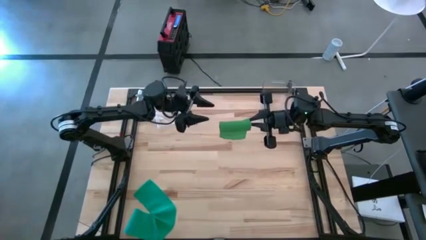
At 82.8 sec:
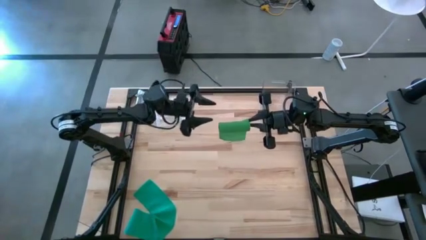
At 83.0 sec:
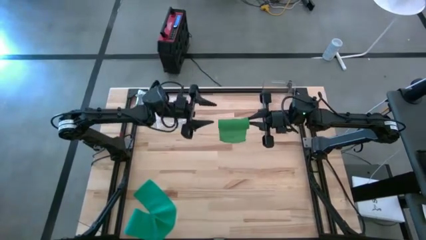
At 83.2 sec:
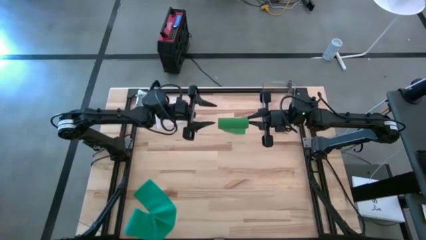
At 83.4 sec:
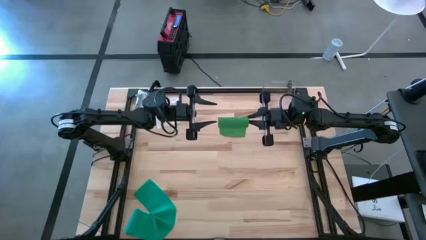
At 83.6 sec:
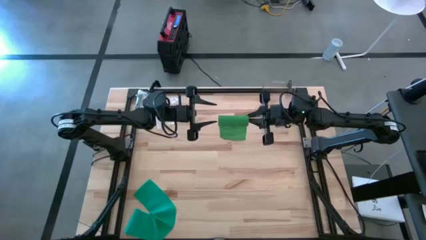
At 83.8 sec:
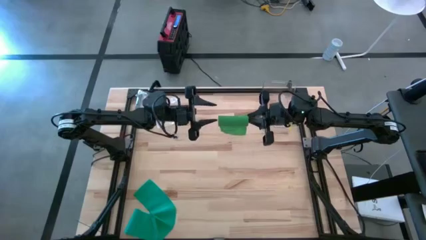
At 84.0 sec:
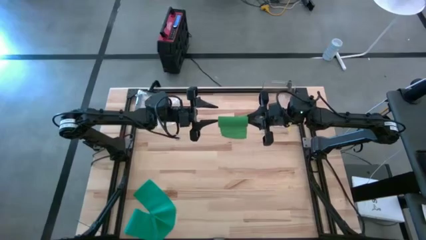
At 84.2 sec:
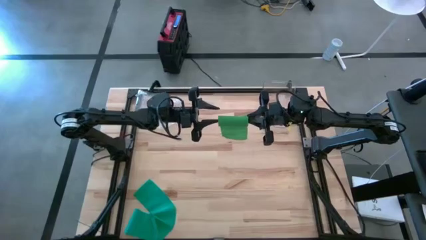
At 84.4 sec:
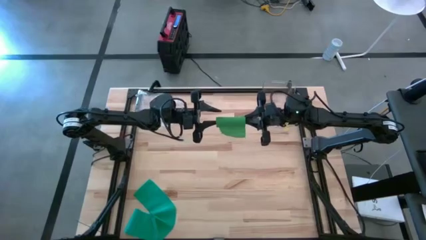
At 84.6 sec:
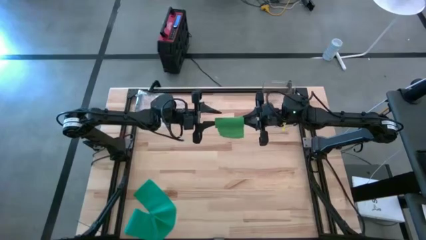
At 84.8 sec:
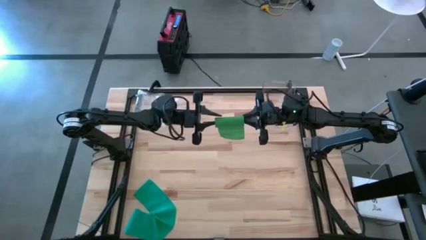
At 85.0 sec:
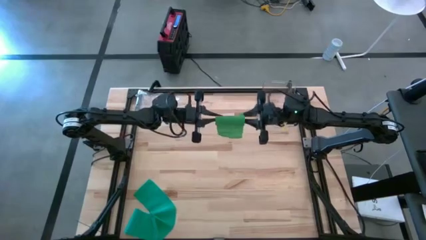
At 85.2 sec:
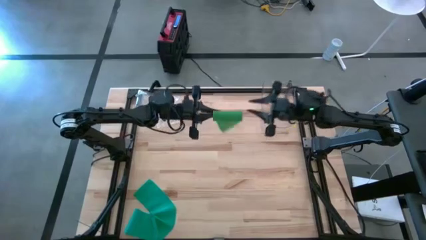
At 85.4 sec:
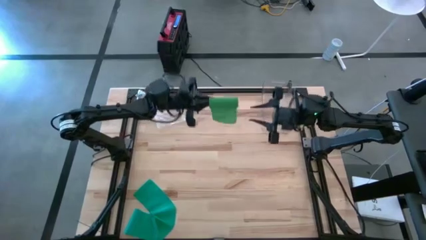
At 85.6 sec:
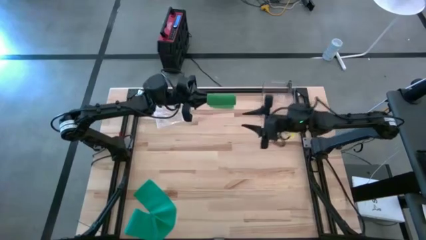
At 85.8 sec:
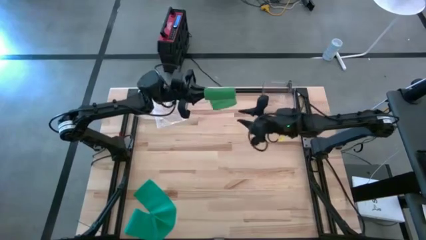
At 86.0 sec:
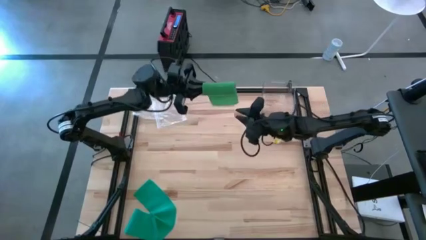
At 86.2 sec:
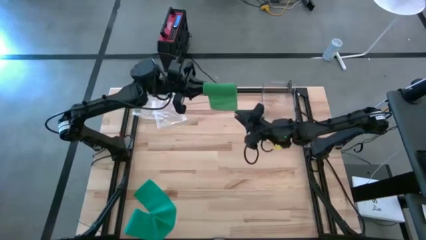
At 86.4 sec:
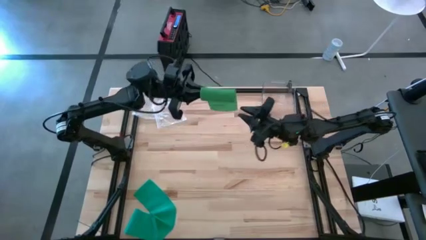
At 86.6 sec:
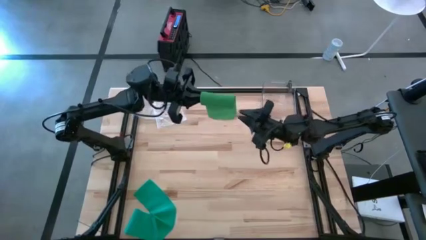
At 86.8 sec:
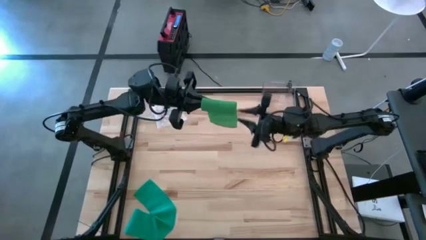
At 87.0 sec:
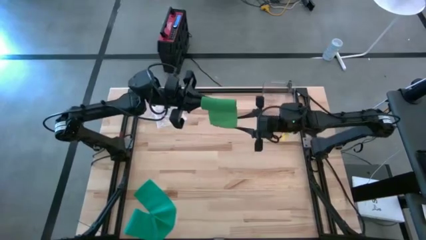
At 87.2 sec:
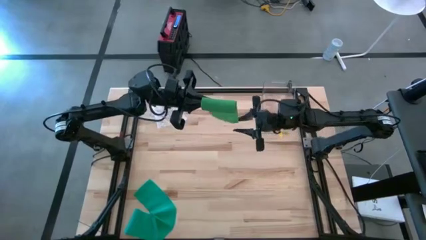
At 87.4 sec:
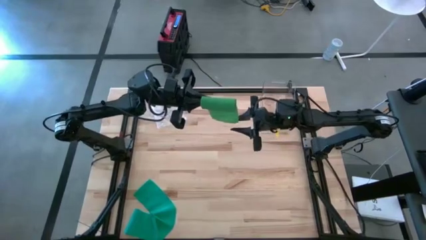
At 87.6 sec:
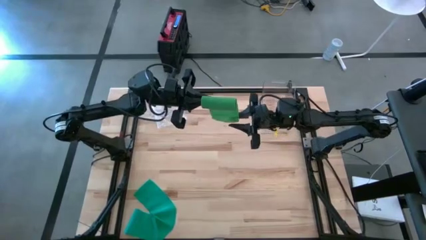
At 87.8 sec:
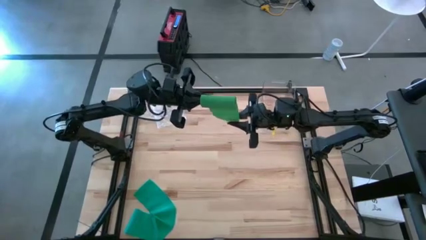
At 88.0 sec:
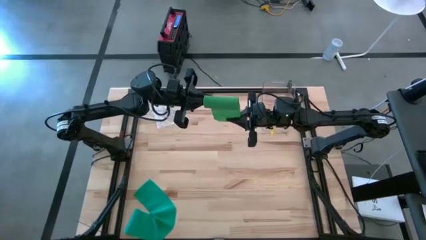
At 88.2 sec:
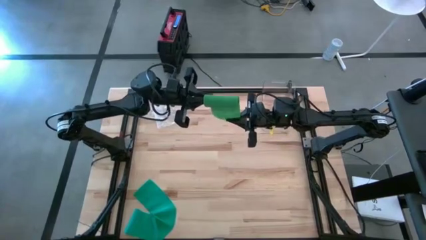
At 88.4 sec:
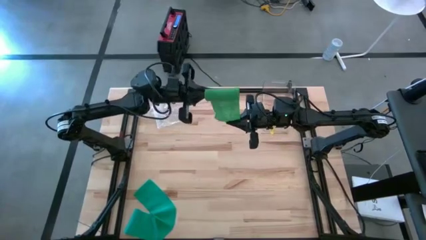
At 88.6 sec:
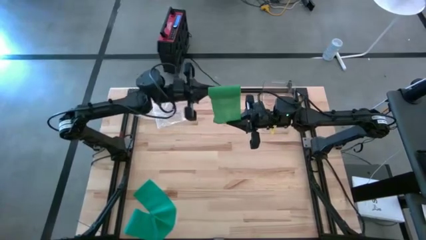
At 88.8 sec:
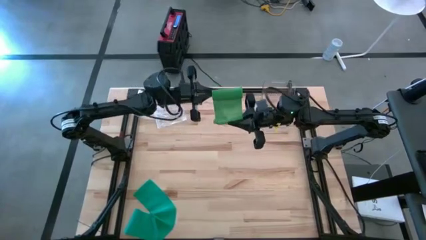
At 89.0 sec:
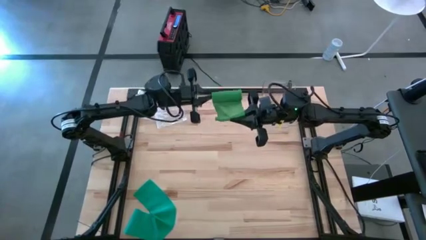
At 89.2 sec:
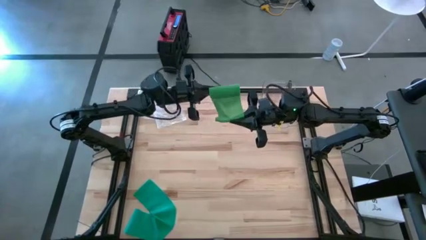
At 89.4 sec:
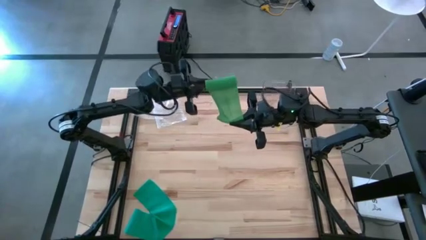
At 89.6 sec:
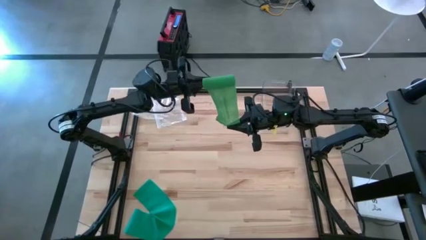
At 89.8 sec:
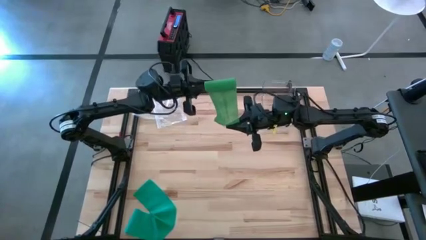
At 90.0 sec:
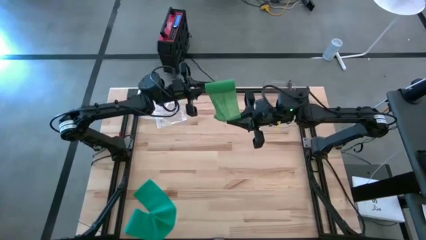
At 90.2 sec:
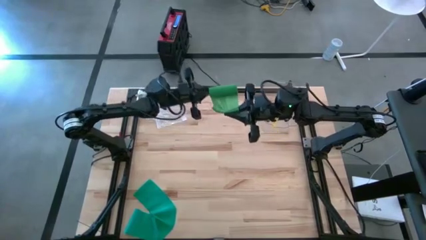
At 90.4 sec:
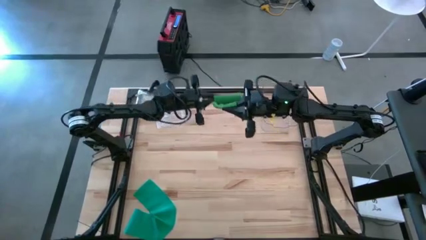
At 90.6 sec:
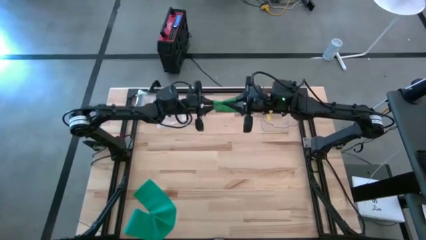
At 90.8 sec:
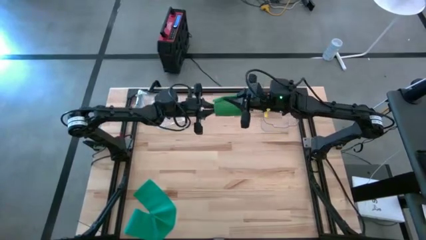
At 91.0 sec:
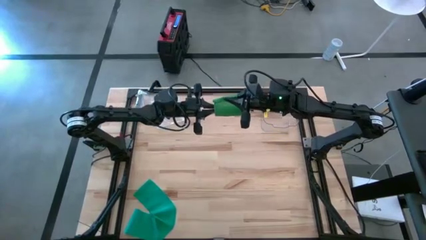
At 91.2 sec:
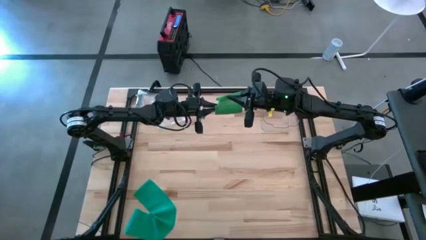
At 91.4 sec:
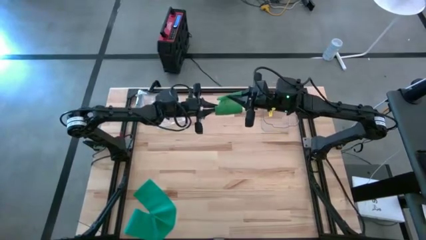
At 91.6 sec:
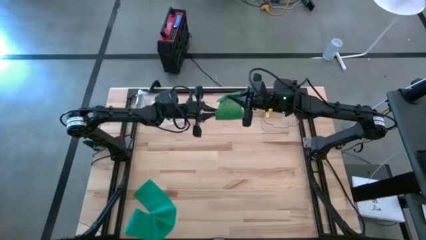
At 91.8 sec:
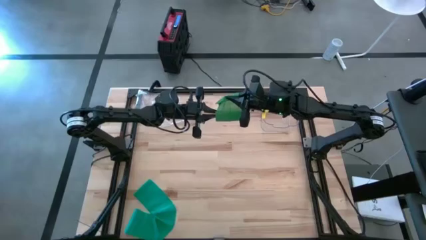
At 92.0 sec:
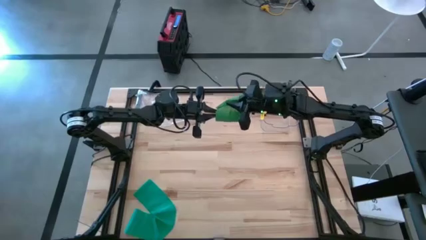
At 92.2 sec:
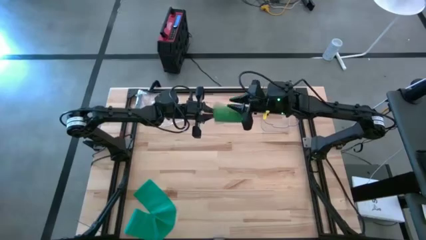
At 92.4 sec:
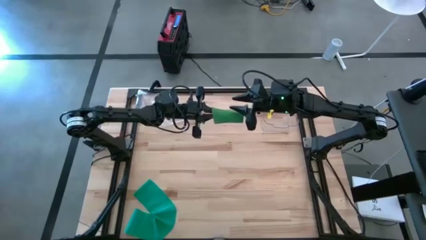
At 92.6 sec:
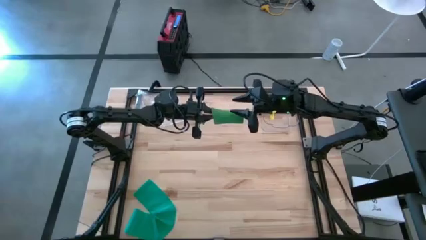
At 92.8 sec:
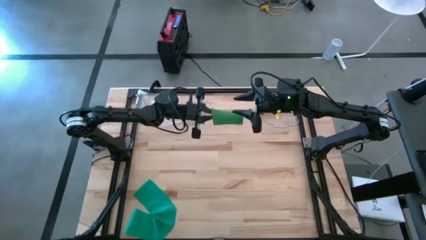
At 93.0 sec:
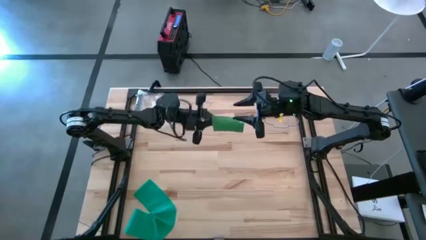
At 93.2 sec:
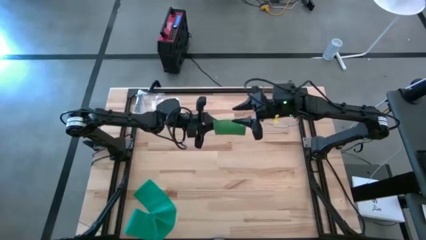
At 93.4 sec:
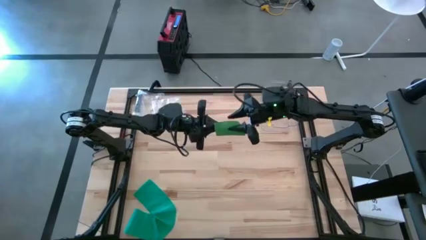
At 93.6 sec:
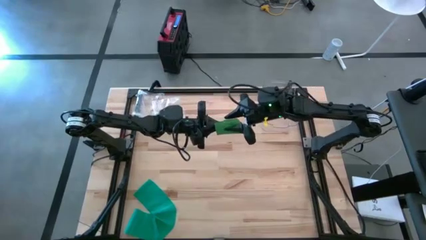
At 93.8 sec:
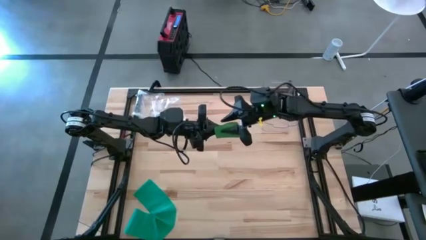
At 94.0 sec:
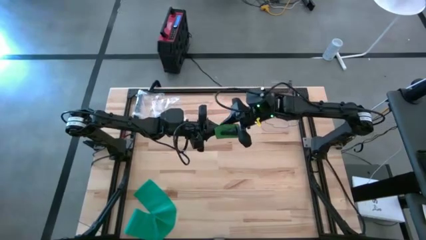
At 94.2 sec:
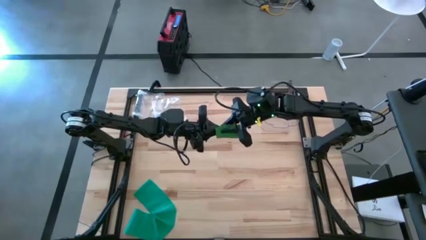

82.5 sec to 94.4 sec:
Task: Roll bandage
Roll the green bandage

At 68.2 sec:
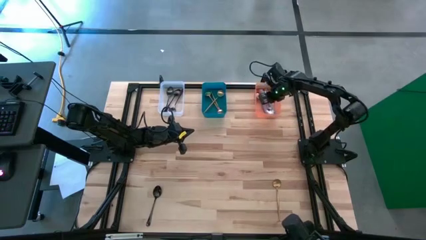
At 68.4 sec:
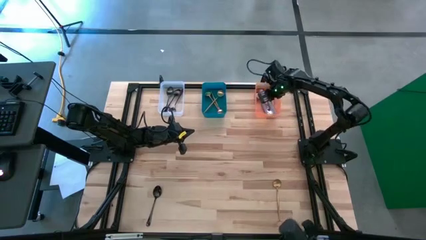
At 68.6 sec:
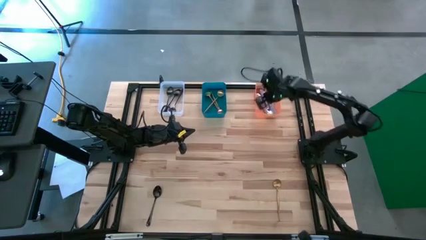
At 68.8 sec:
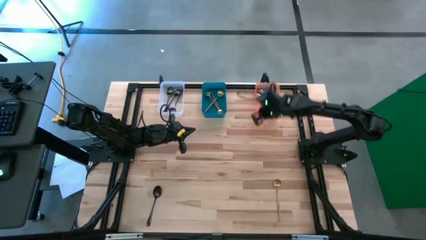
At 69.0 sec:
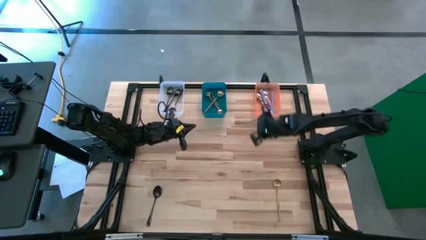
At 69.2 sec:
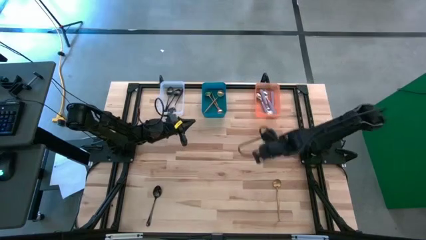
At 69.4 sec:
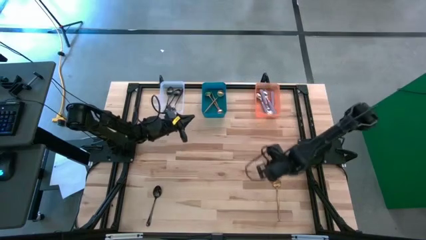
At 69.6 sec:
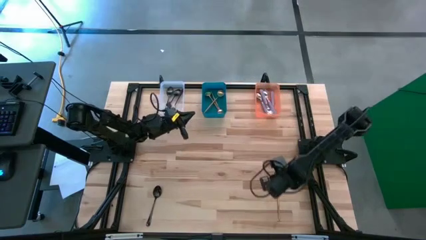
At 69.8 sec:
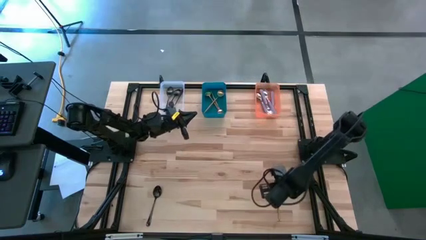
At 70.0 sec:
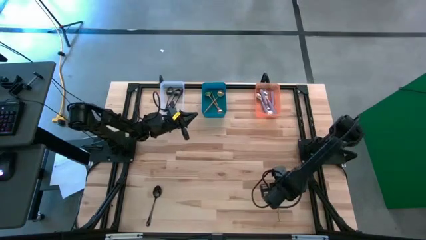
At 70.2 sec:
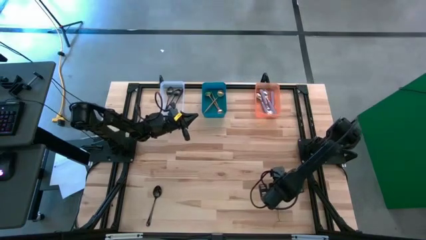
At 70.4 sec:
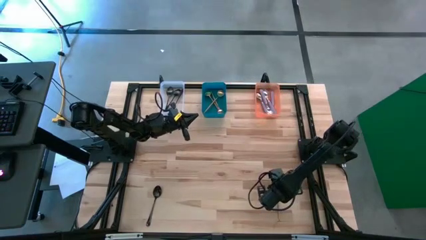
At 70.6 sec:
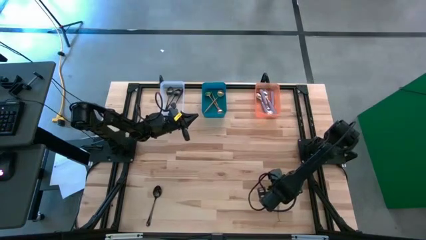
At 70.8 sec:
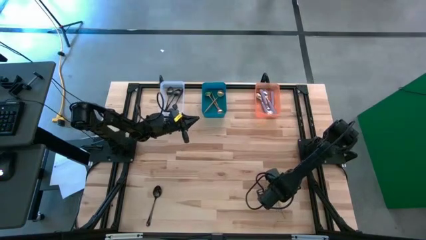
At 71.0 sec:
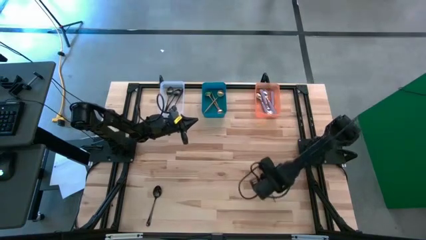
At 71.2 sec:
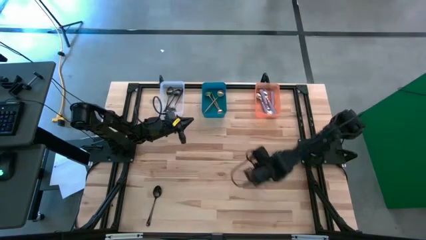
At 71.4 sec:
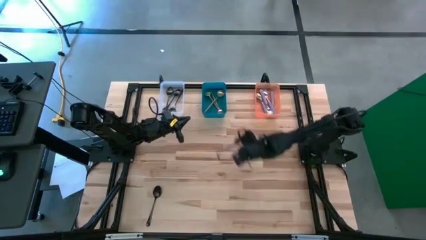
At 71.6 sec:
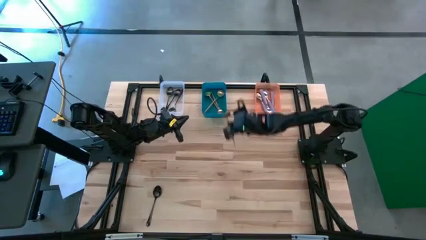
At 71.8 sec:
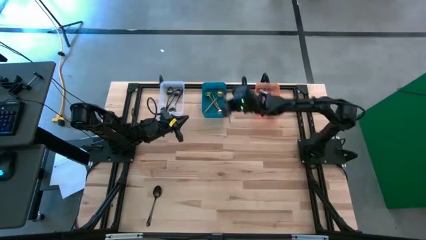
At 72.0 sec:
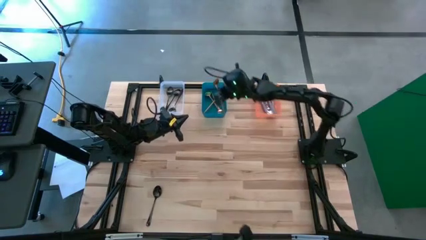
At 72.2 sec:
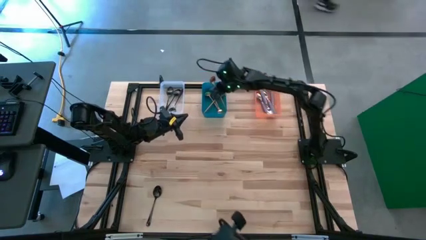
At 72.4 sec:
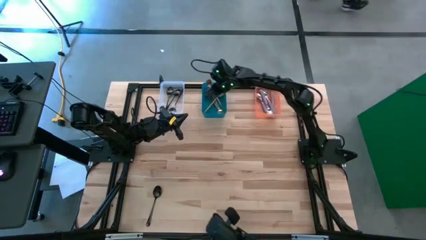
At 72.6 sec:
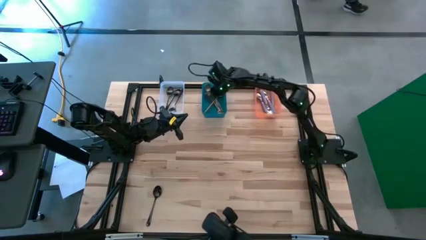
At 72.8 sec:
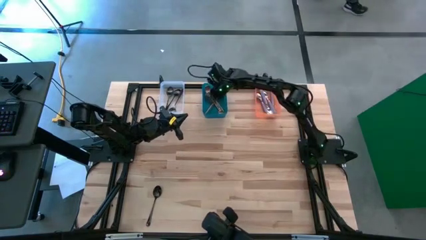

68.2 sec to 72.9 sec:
Task: Sort silverware by color (type)
Put the gold spoon into the blue bin
